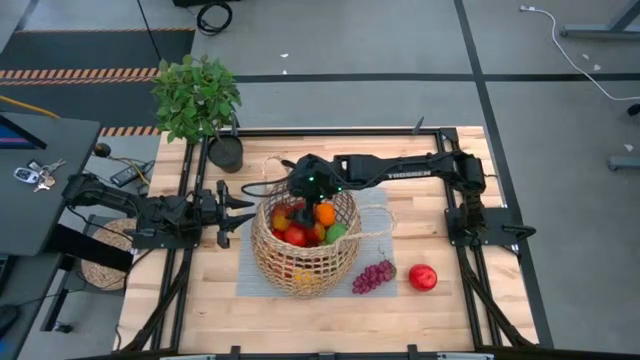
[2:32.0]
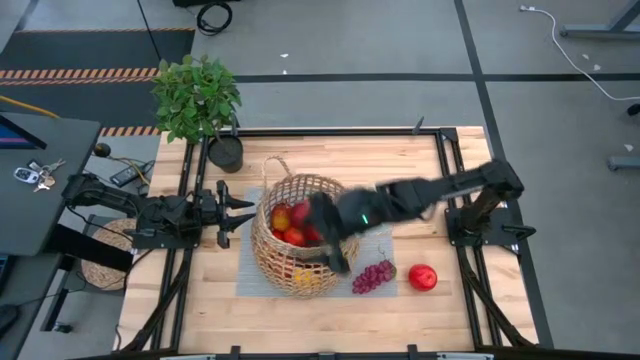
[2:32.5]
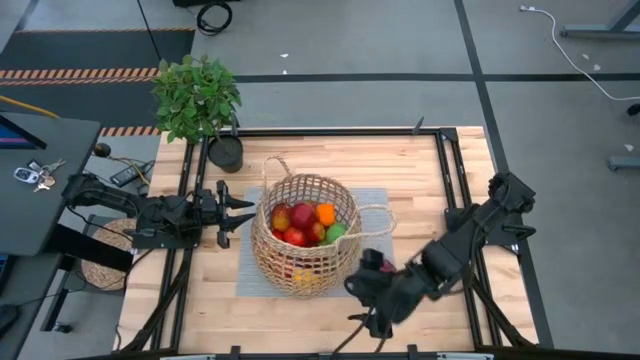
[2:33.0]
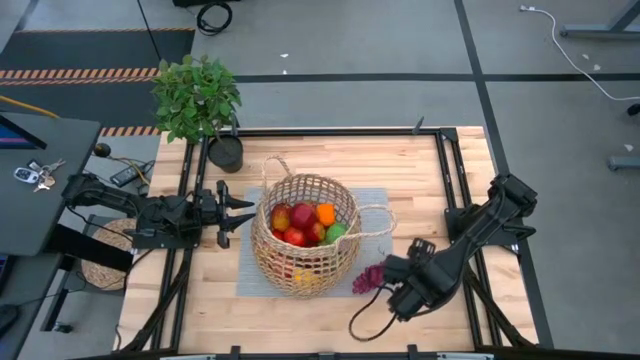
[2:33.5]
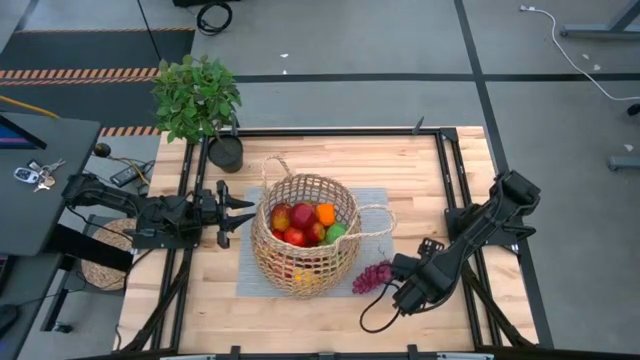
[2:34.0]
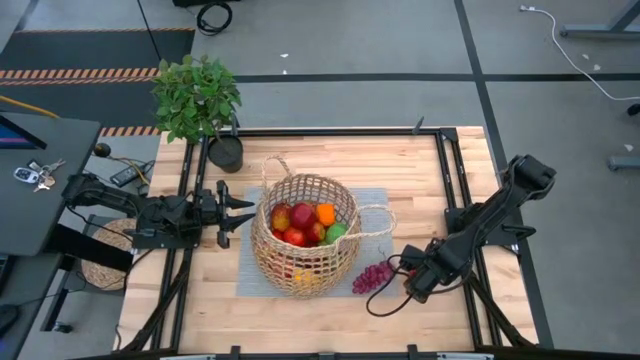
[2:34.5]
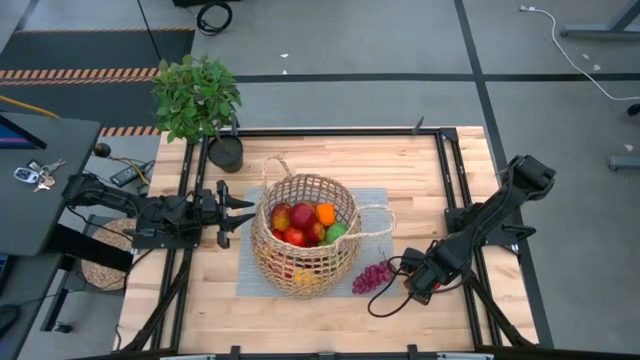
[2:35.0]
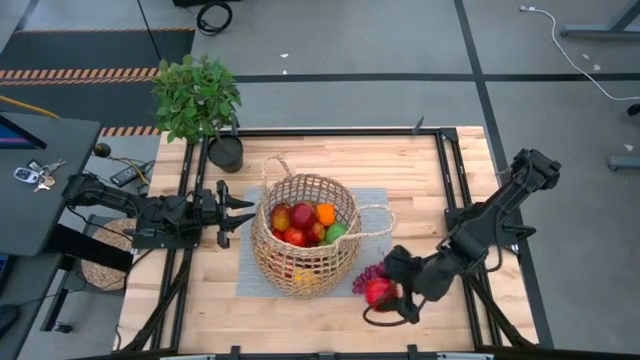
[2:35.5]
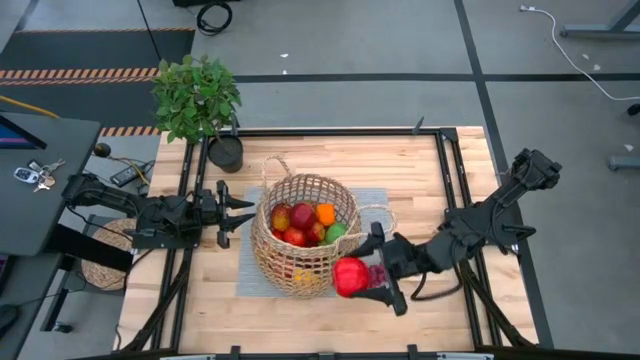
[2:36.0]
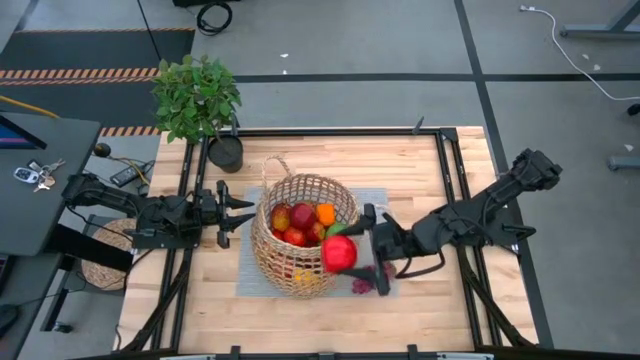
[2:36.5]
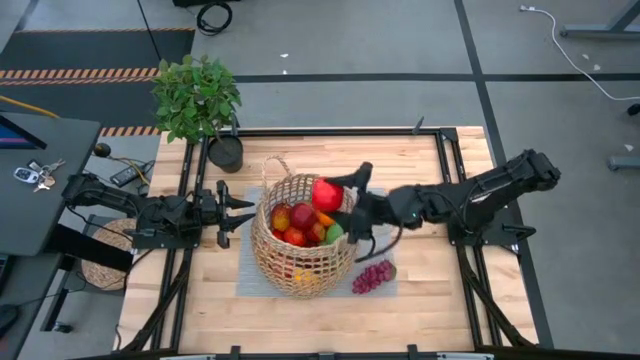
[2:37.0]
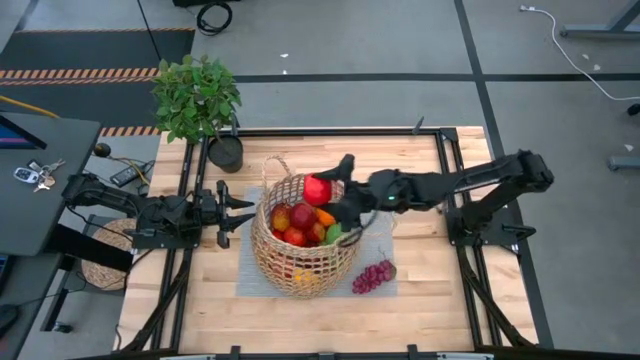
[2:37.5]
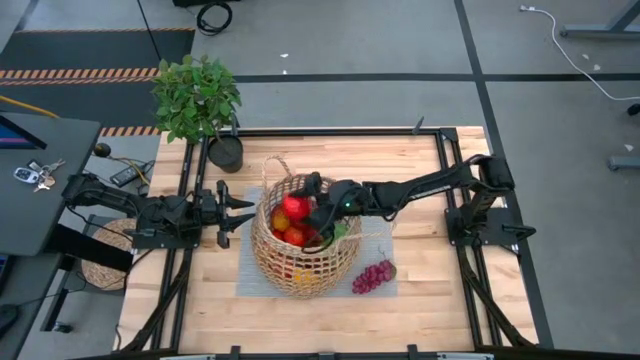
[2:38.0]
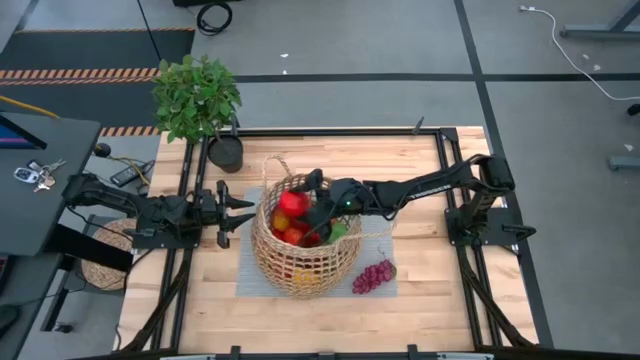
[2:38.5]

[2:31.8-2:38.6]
Task: Build produce basket
Put the red apple into the basket

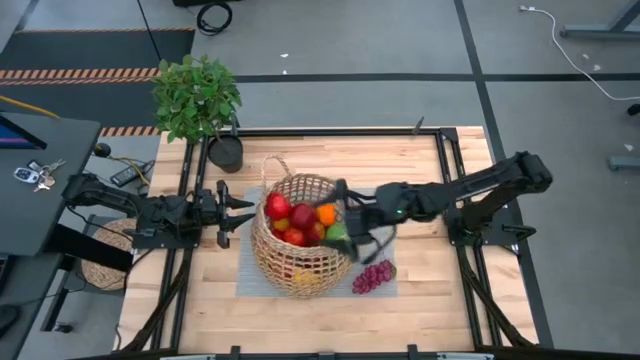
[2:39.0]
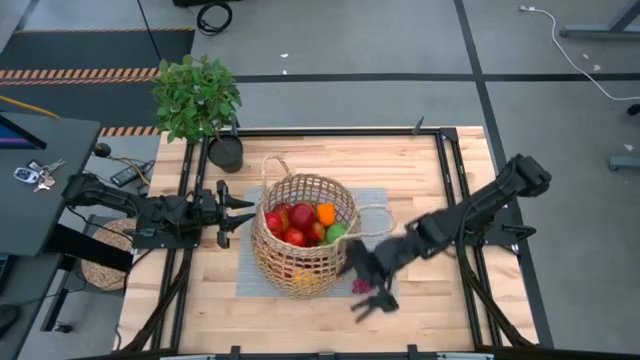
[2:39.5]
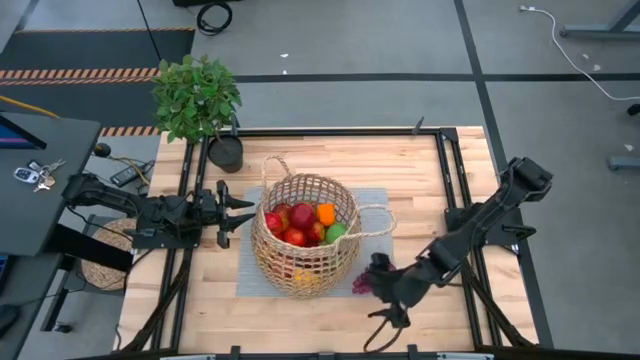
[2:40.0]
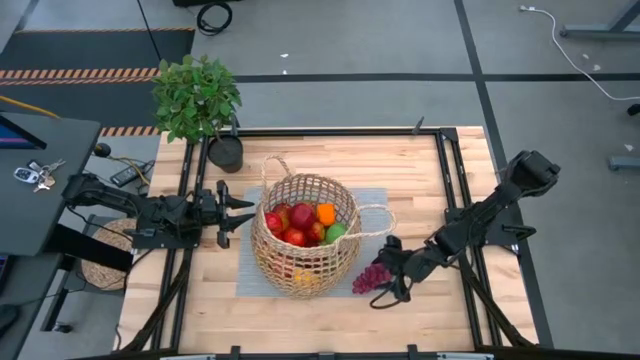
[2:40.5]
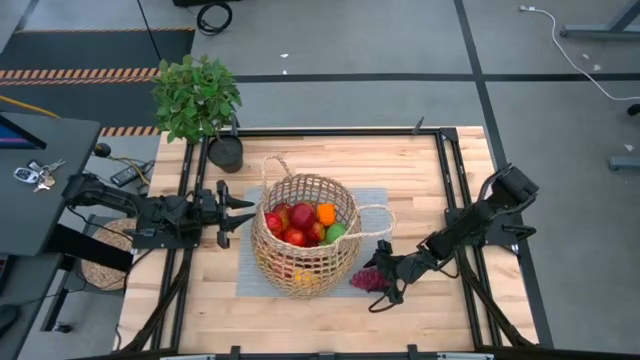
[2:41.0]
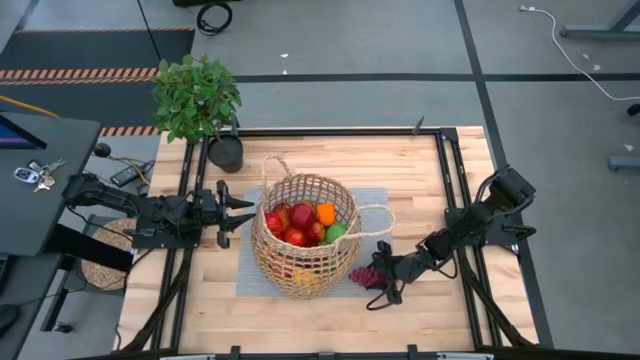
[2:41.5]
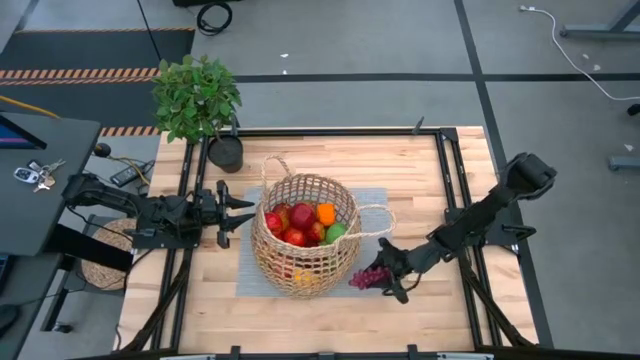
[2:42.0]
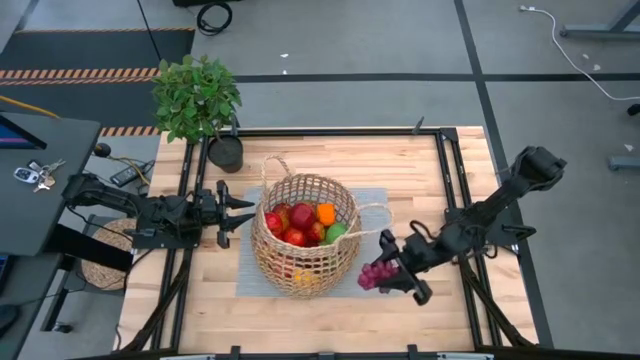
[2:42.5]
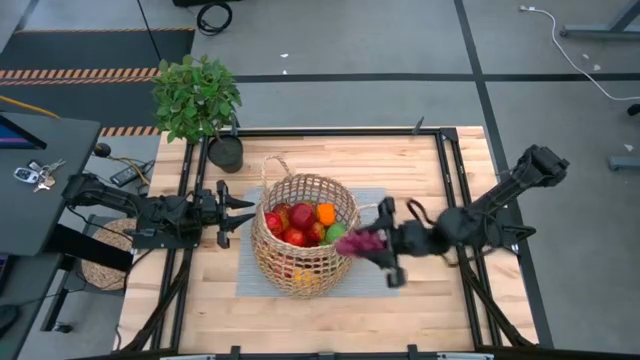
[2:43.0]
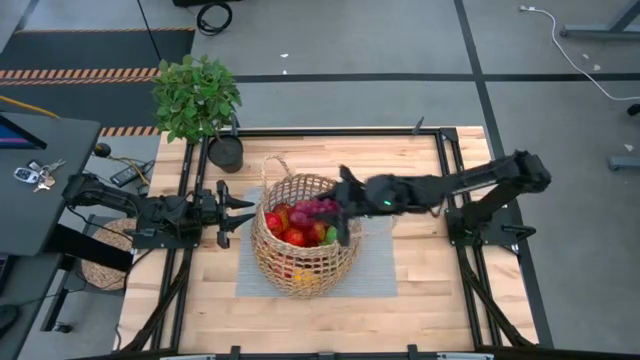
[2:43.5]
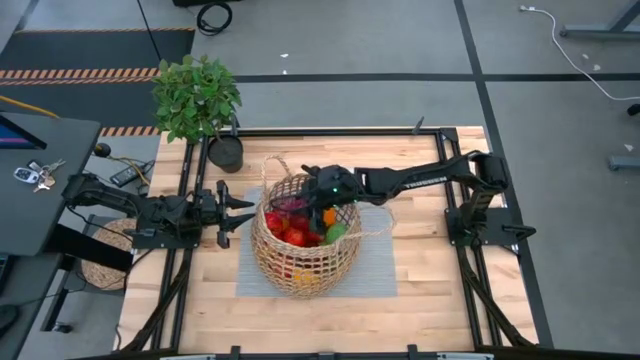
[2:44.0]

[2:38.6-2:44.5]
Put the grapes into the basket

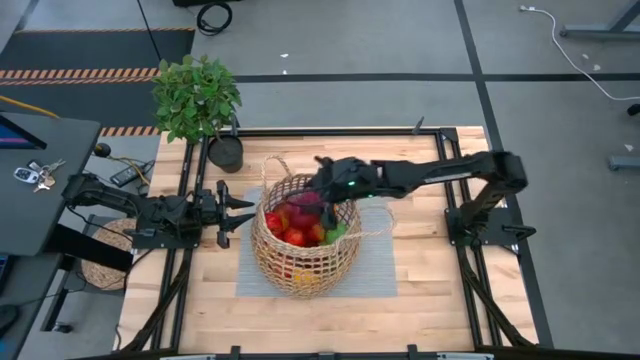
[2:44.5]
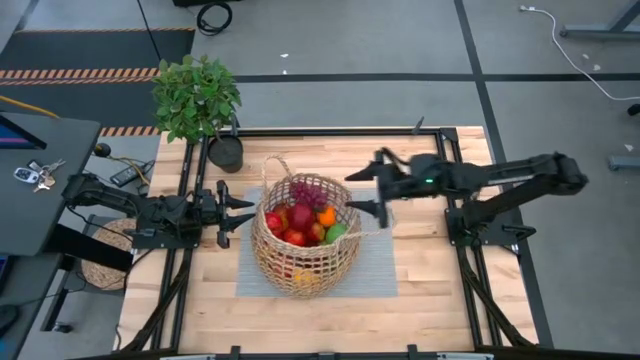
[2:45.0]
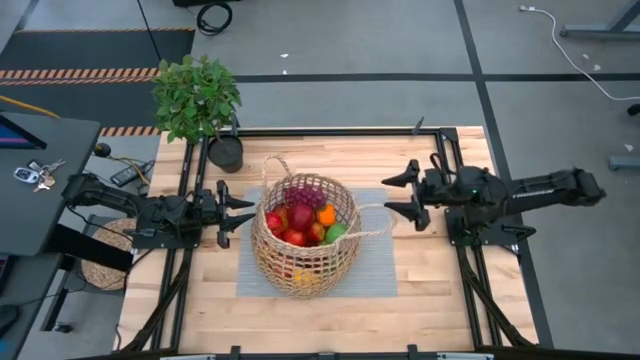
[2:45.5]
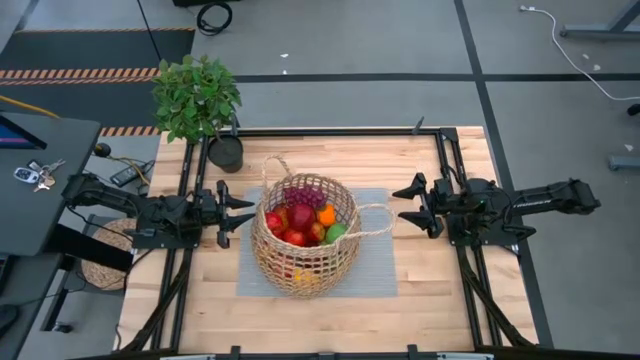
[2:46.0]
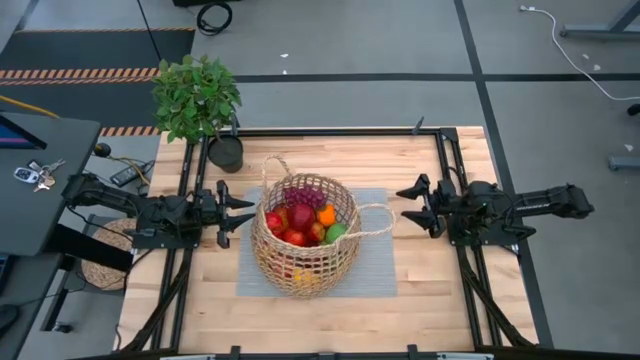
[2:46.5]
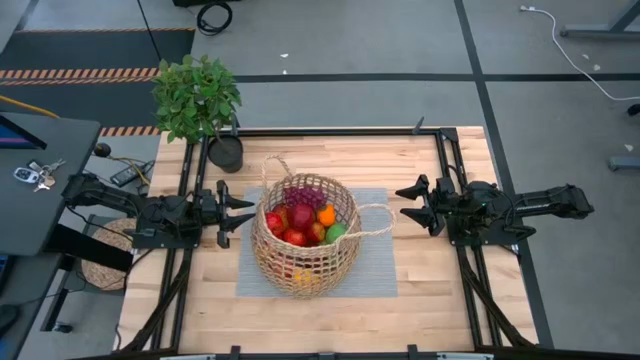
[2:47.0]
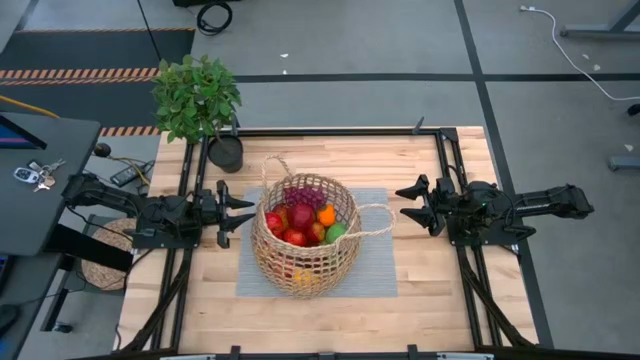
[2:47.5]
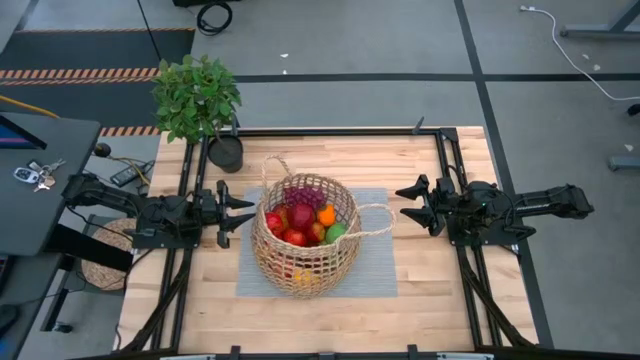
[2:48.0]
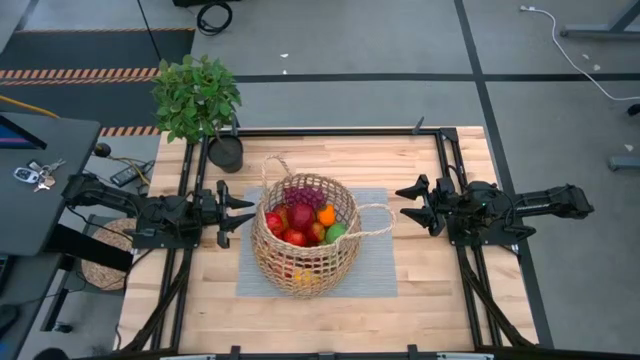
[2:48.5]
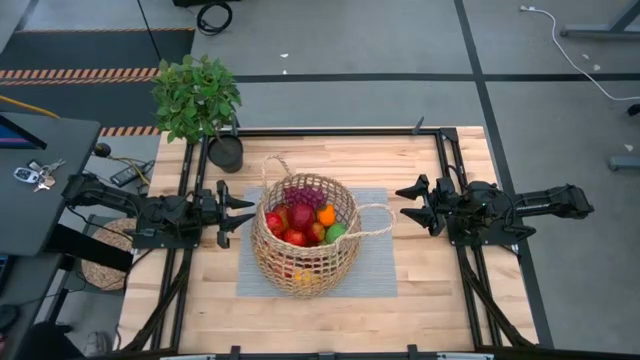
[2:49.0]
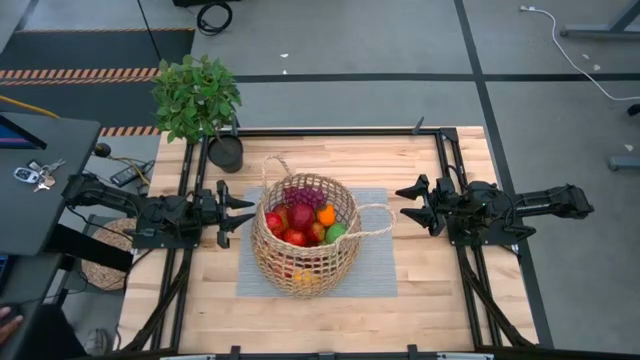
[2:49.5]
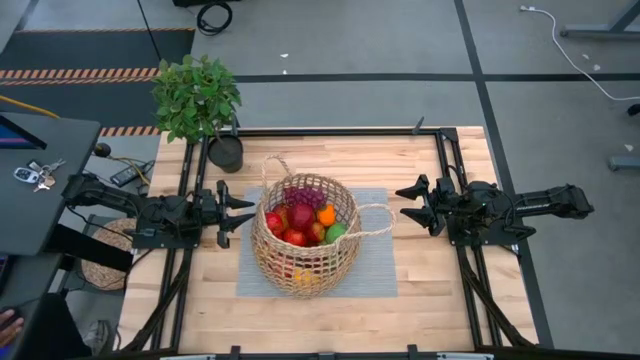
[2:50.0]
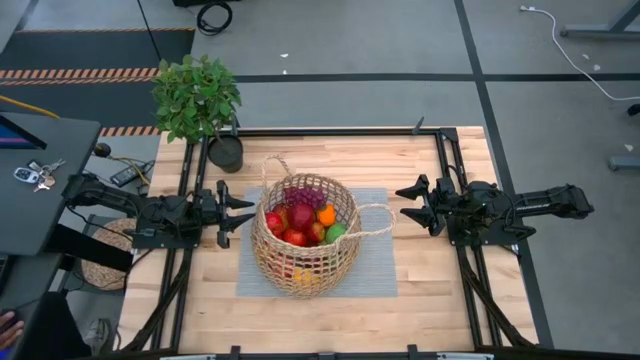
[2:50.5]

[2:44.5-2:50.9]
Return to Home Position

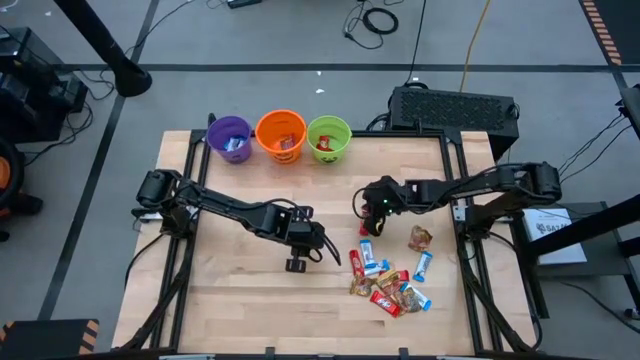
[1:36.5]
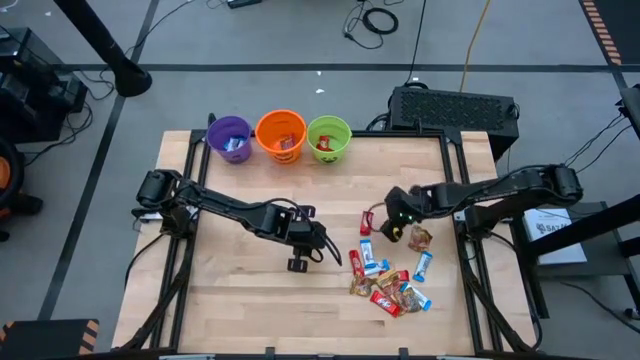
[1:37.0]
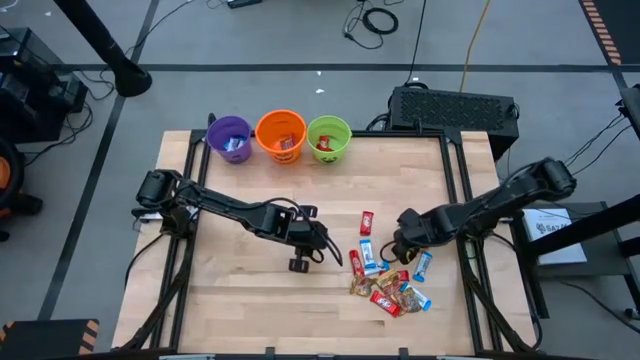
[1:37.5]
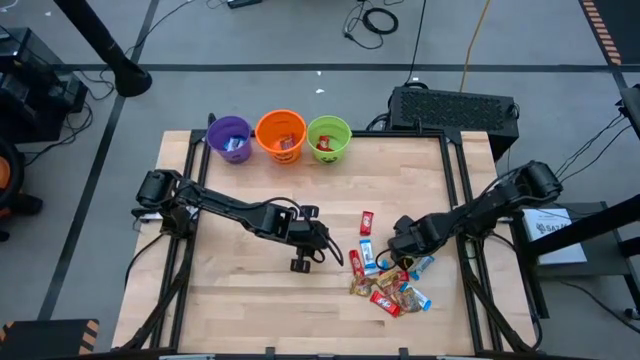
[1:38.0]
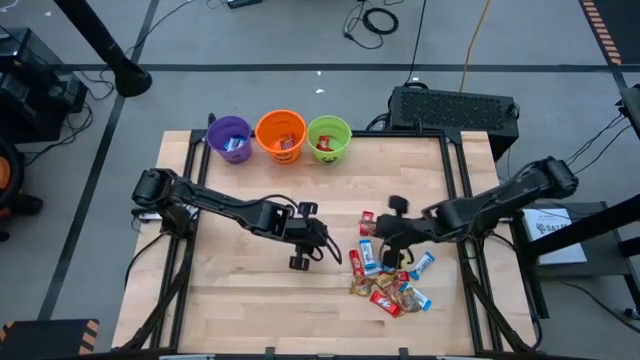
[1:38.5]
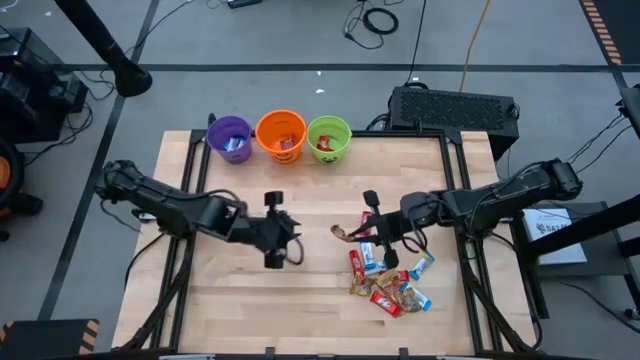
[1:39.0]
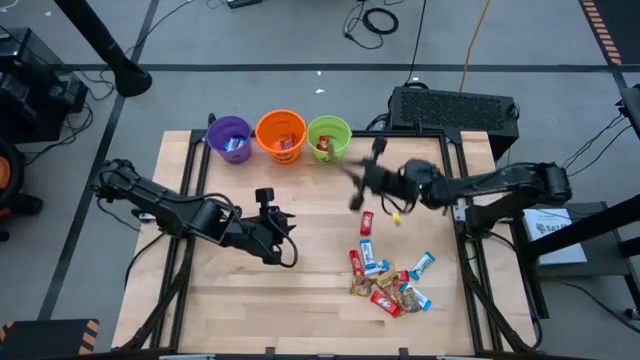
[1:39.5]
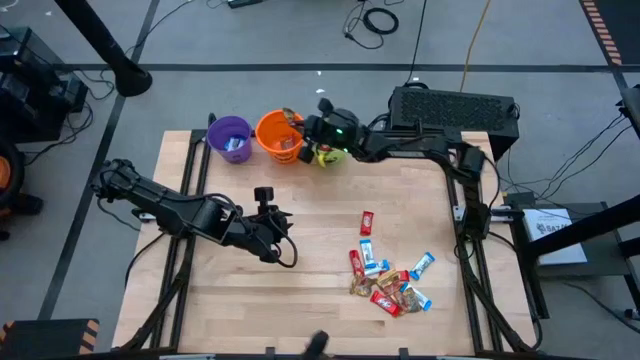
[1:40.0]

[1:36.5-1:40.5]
Task: Sort candy by brand, put in halloween buckets
Put golden candy into the orange bucket
